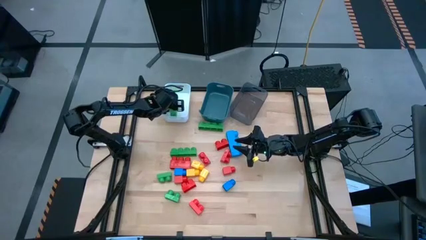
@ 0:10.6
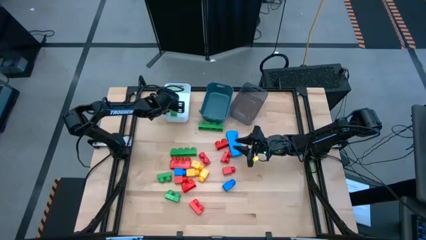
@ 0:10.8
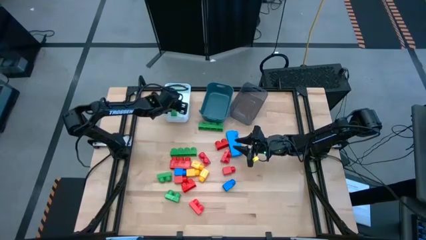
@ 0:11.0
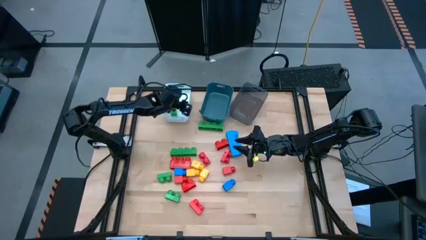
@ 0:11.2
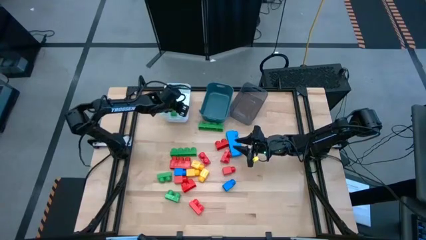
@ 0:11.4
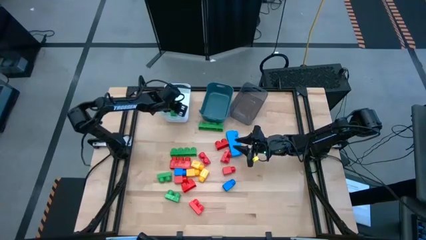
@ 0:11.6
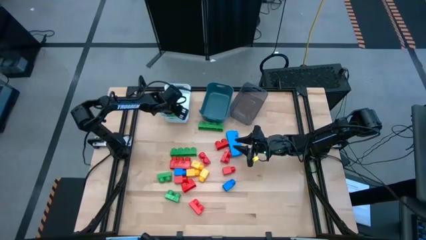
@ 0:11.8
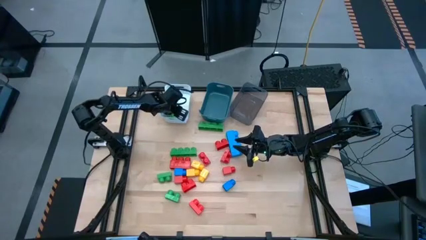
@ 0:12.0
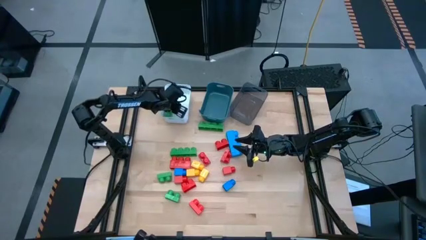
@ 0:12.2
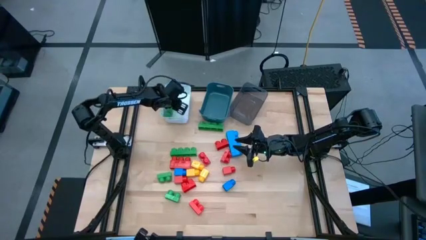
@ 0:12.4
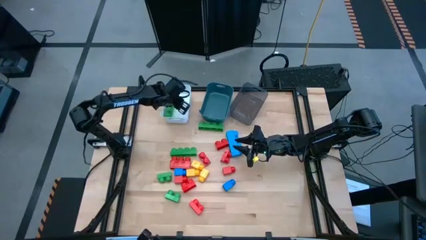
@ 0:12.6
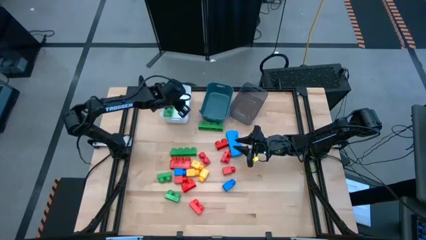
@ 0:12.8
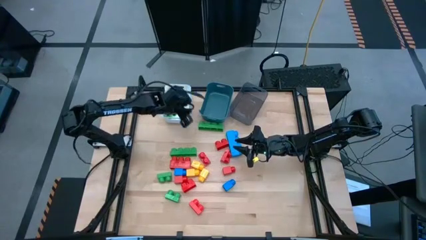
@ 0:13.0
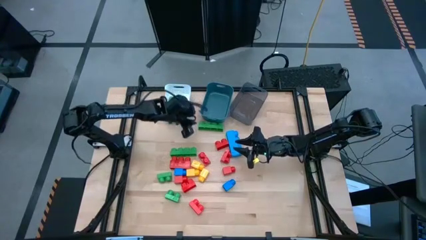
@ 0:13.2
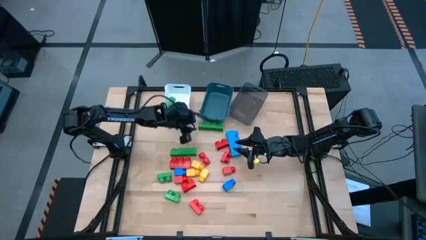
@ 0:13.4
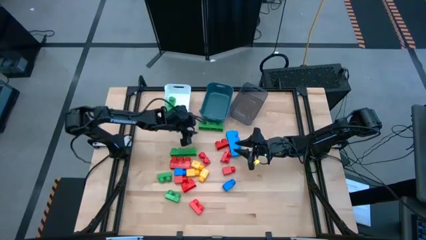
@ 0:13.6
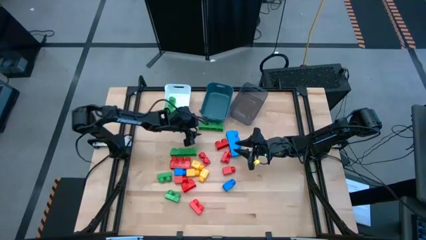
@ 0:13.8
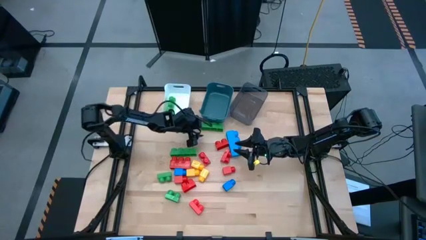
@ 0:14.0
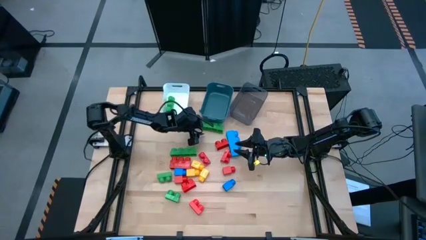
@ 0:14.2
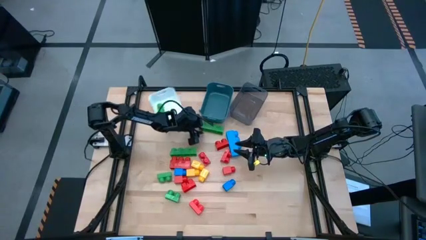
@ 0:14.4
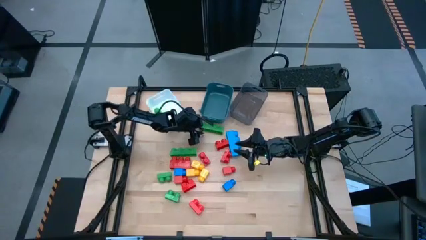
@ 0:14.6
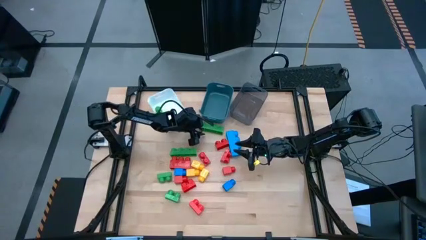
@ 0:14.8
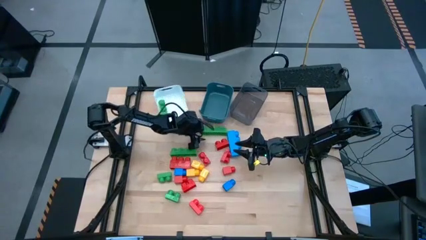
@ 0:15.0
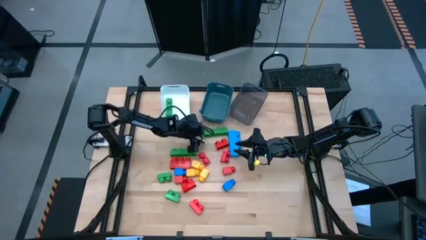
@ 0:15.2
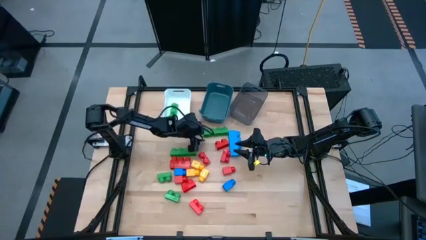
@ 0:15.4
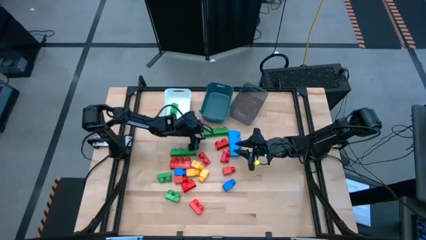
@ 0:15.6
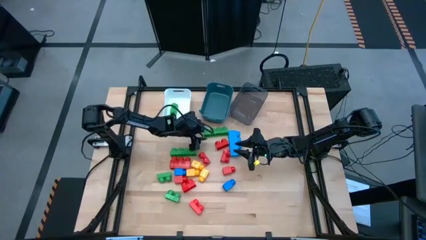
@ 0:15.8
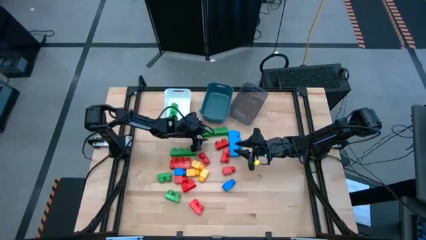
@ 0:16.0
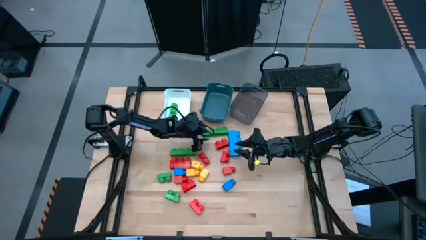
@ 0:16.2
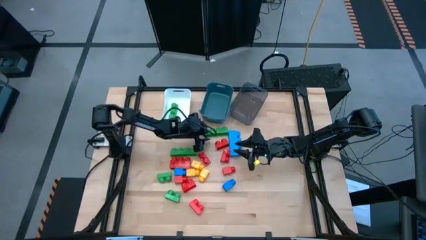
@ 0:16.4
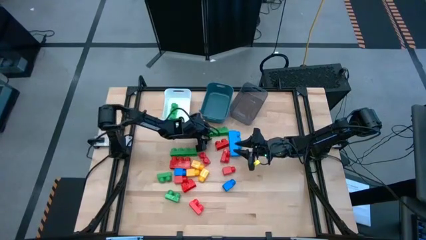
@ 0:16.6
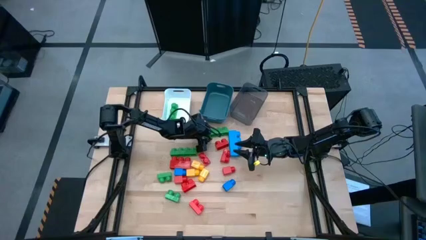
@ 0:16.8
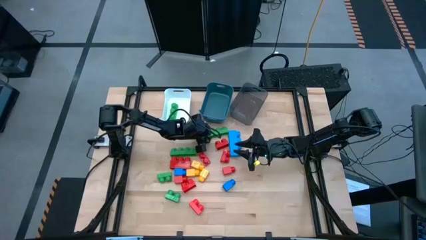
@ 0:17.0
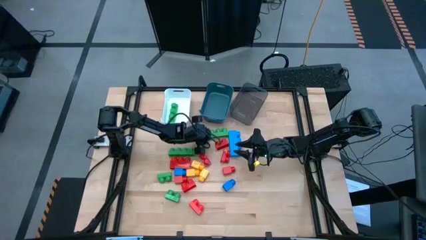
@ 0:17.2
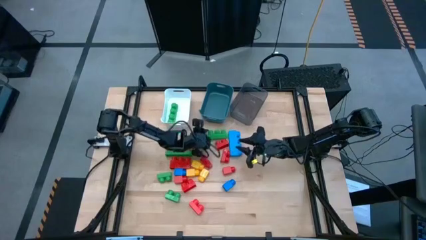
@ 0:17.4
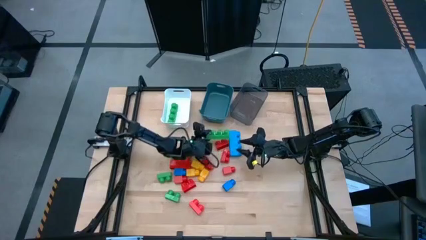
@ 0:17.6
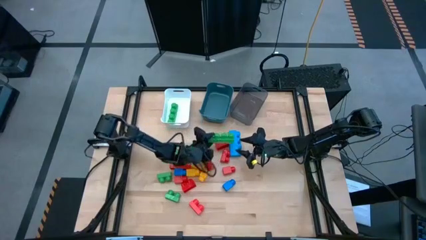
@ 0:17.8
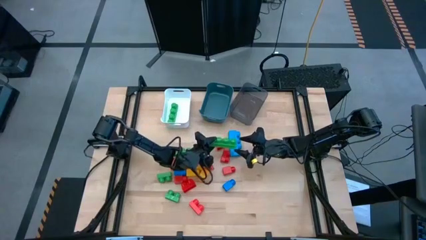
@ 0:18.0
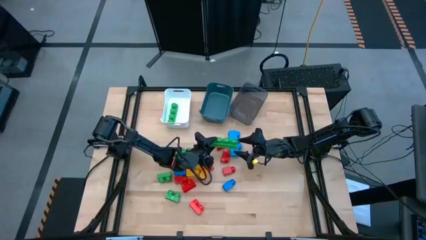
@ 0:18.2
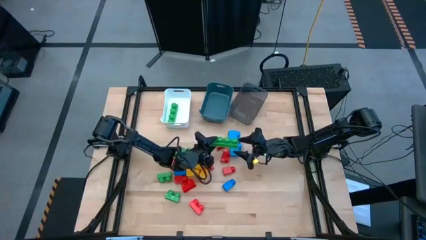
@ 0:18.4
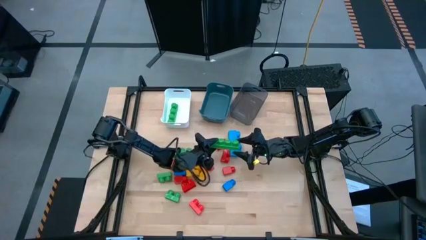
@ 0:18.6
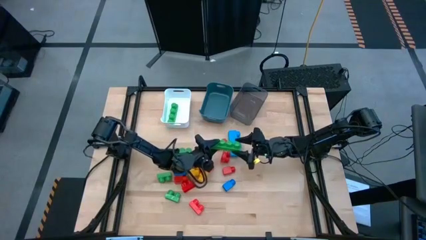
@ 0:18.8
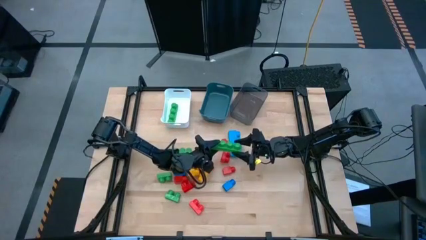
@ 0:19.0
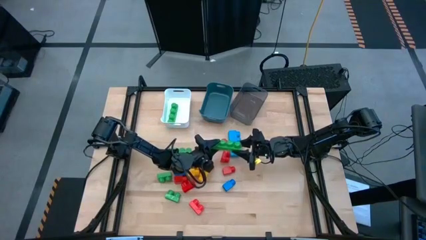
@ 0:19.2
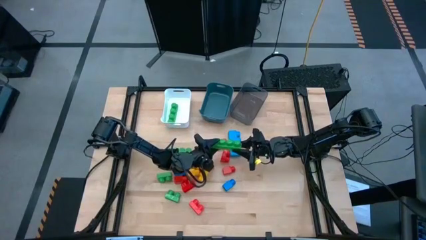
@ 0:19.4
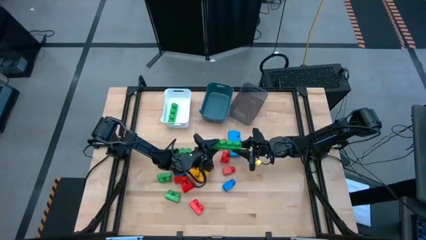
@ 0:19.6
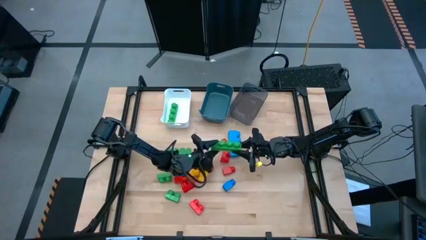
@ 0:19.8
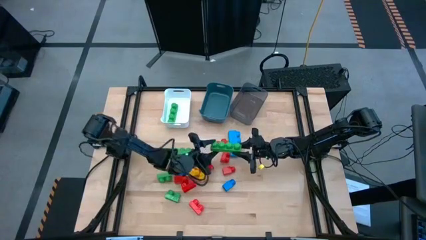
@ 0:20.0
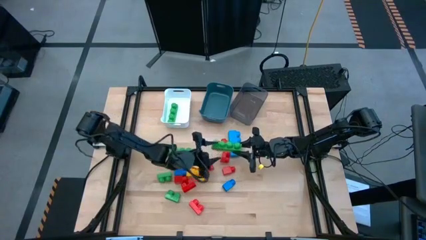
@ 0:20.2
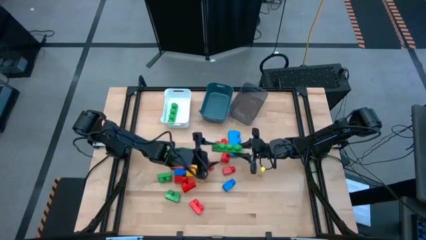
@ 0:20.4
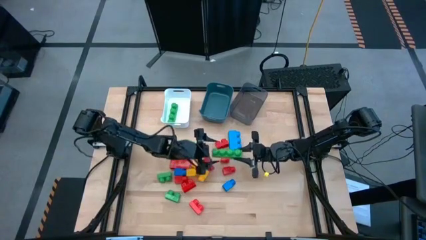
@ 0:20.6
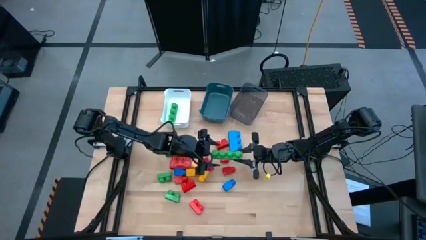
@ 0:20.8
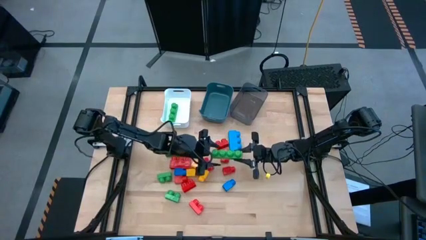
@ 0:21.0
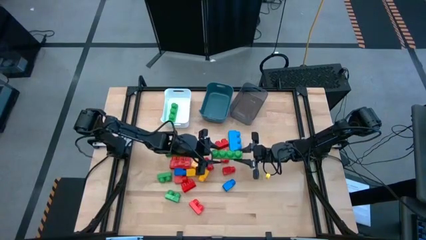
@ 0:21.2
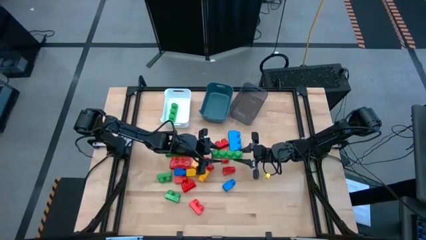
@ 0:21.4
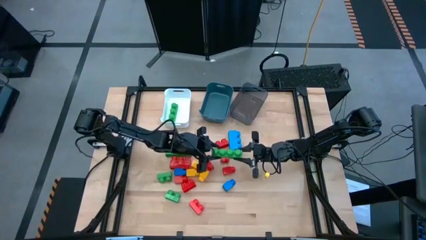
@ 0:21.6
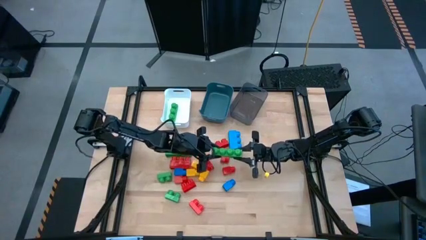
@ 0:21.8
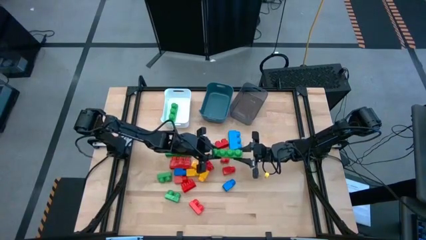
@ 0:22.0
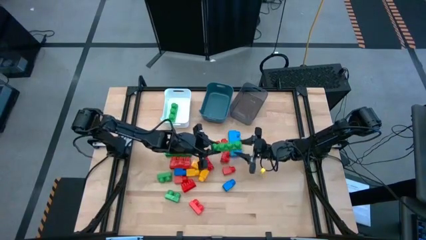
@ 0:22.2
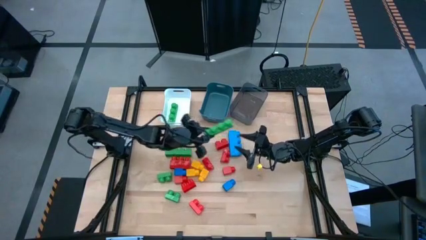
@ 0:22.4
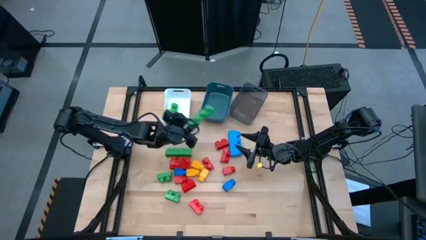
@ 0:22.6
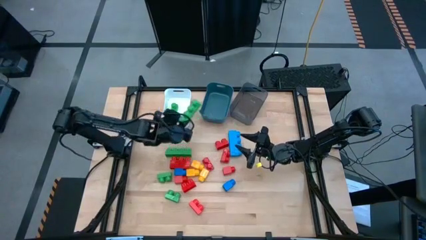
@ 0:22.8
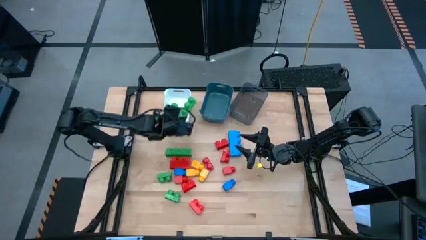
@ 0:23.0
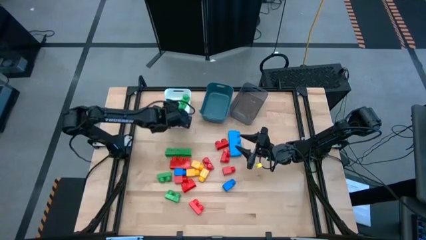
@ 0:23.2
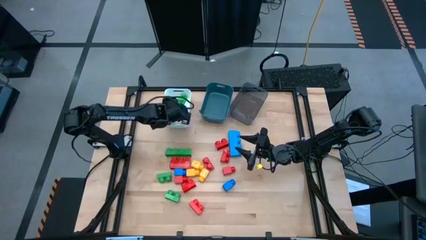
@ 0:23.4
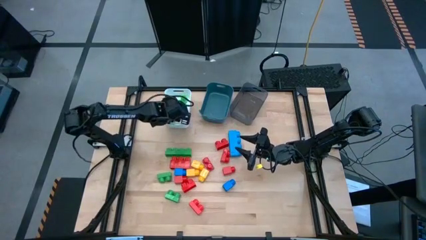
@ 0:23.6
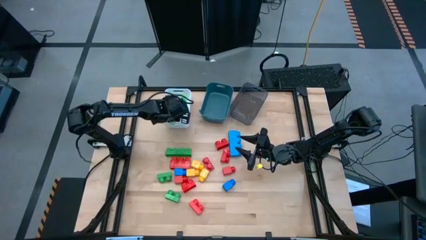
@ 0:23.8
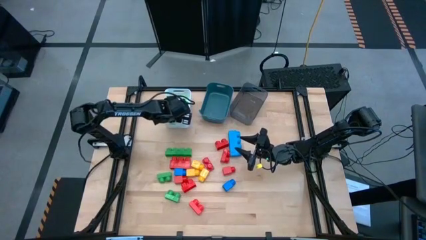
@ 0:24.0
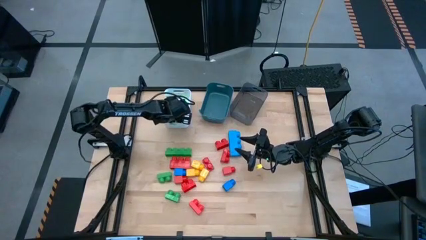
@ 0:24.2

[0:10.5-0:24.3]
Task: Sort blocks by size
Put the 4 studs green game piece into the white bin
